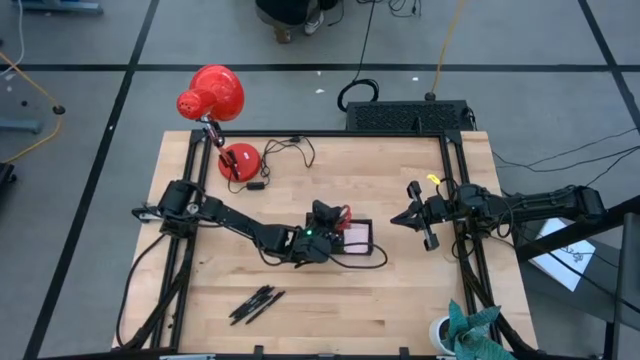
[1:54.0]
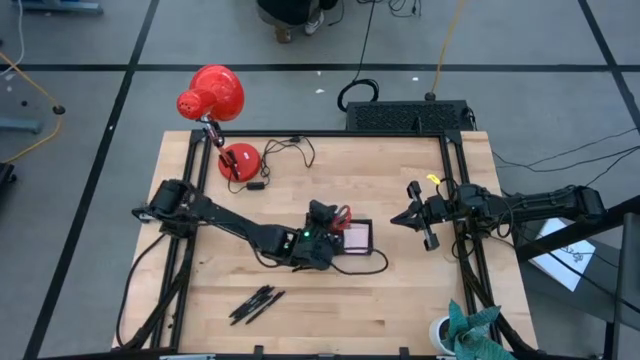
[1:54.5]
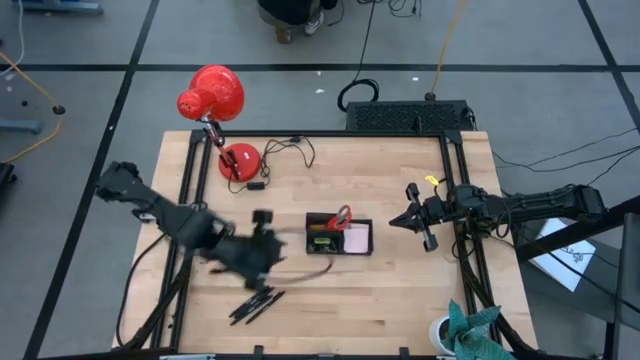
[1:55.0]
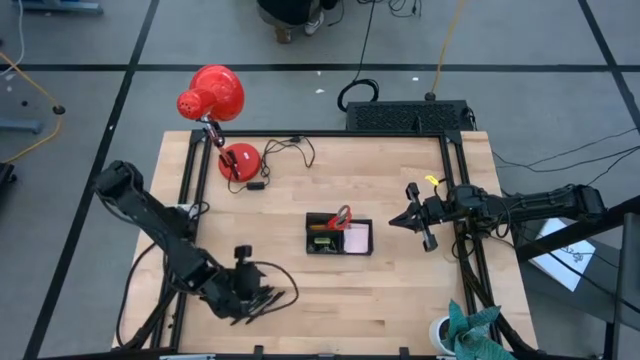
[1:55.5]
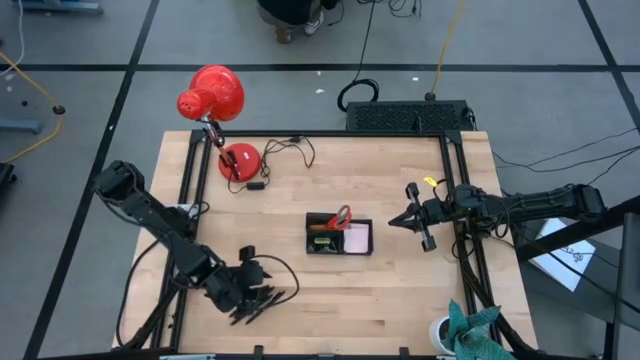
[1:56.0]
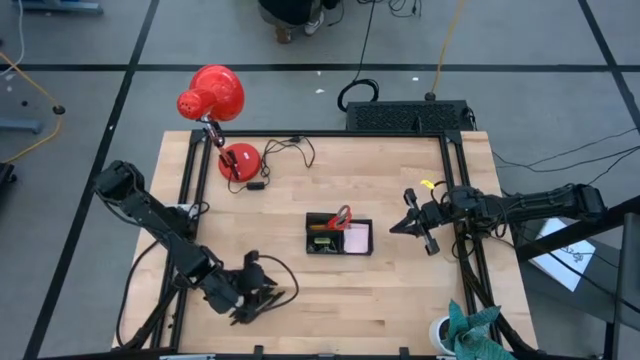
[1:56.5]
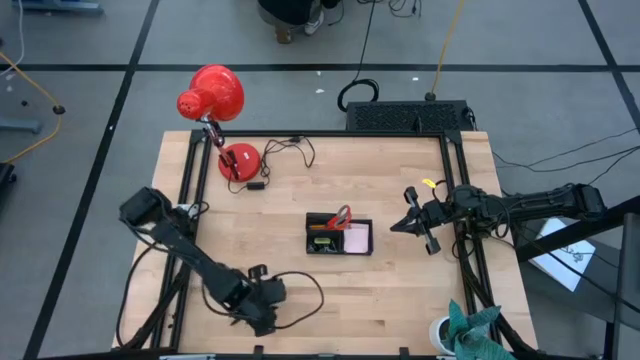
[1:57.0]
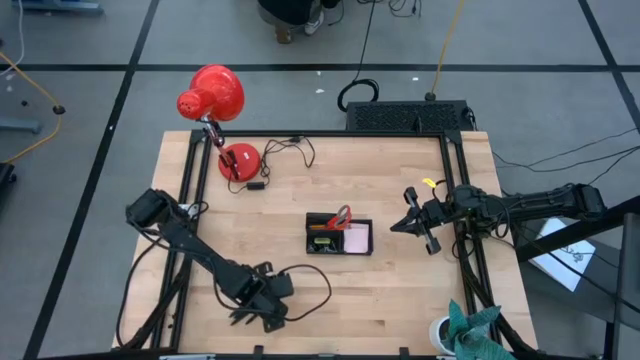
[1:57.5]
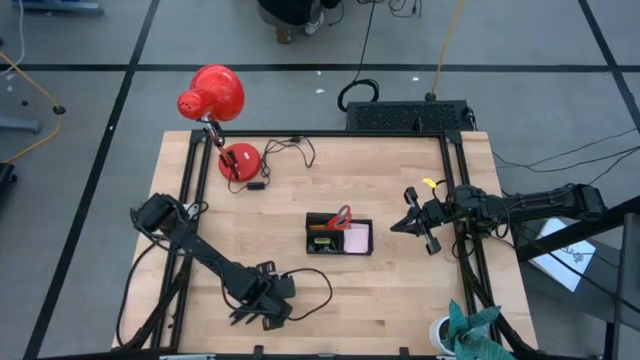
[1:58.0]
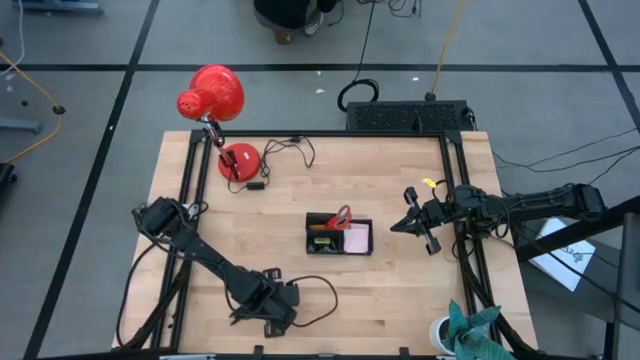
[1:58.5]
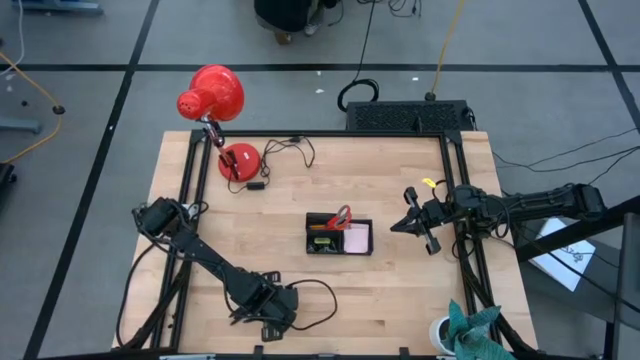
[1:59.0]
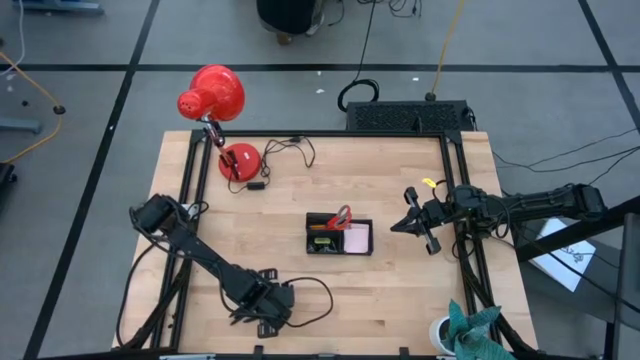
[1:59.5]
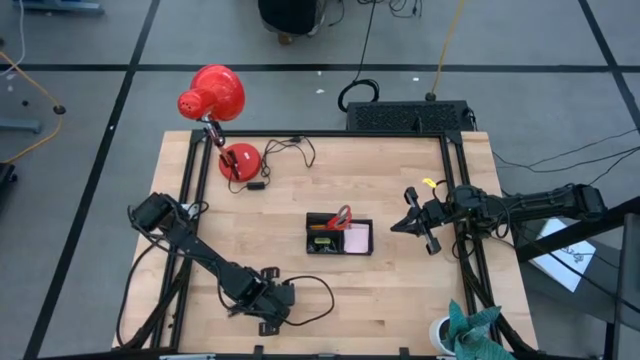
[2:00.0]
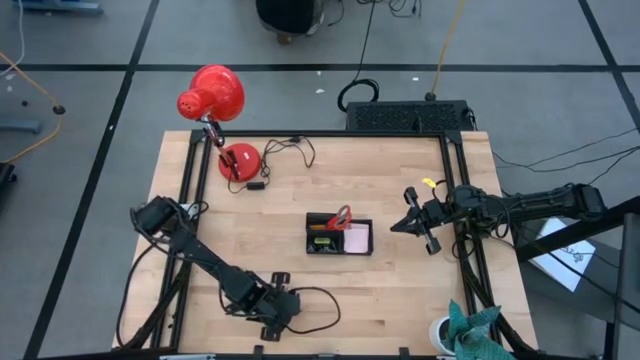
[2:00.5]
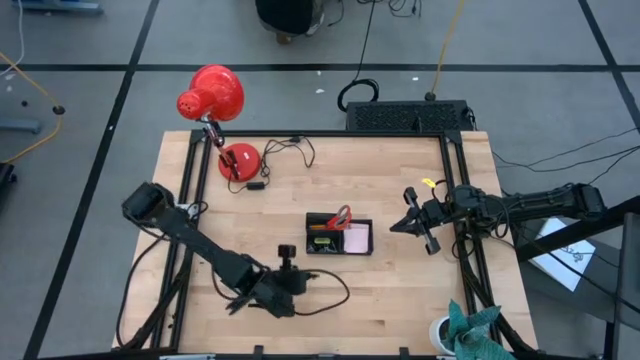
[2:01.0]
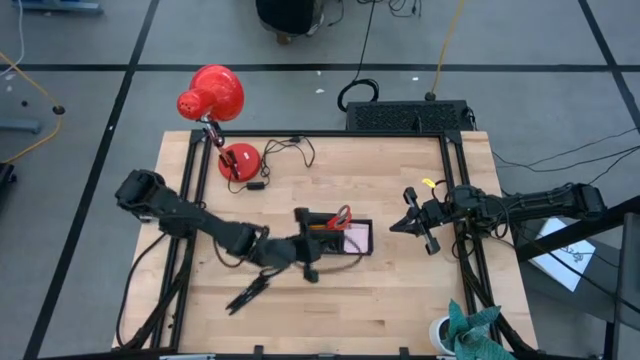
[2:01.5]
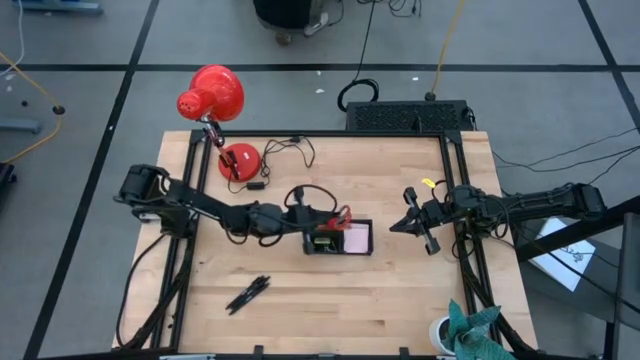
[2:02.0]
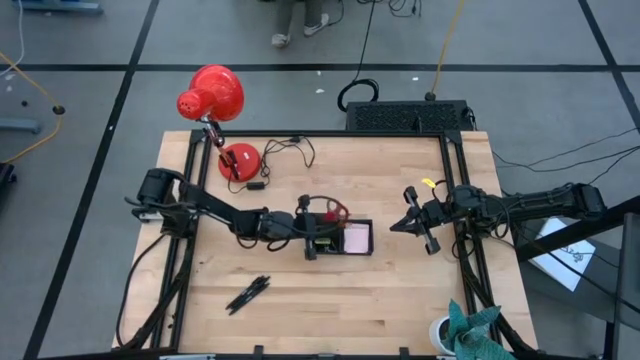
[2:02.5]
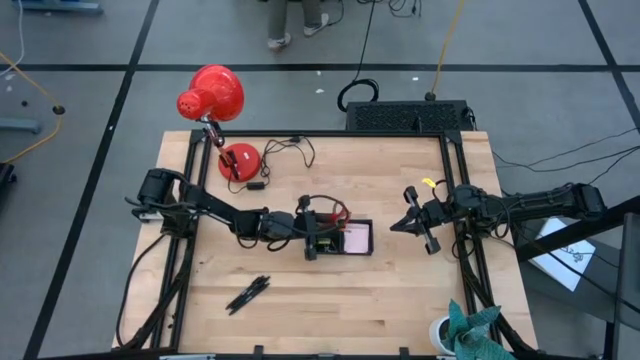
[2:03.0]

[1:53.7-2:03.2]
Task: Pick and place office supplies into organizer
Put the black pen into the black desk organizer

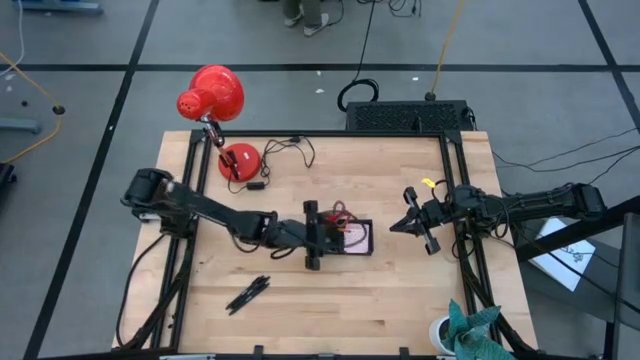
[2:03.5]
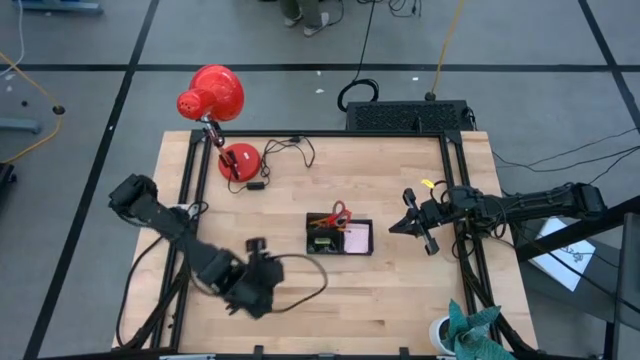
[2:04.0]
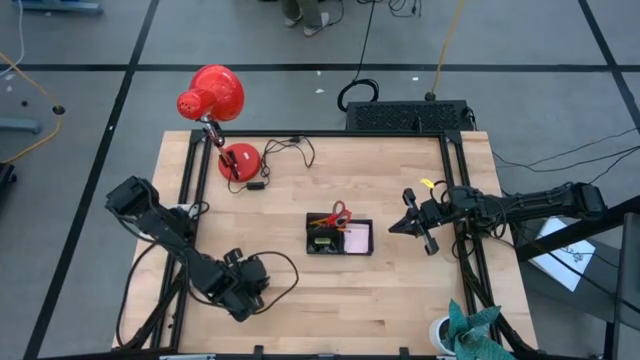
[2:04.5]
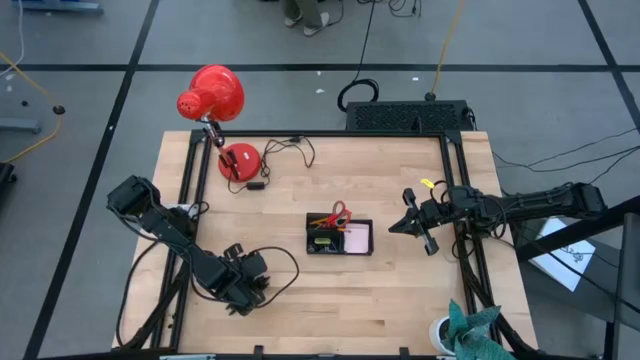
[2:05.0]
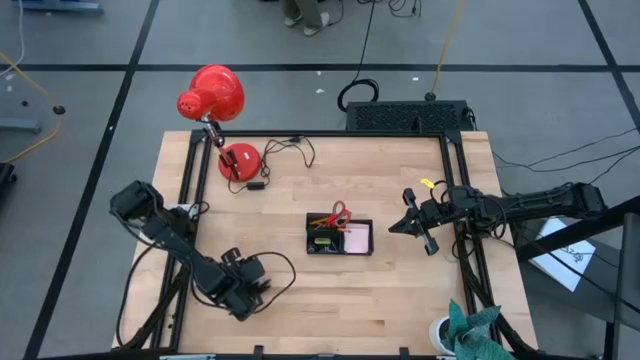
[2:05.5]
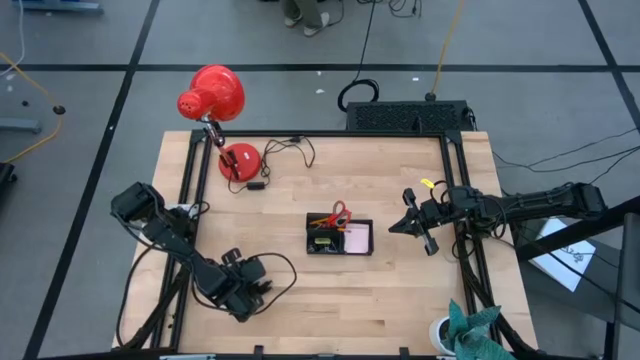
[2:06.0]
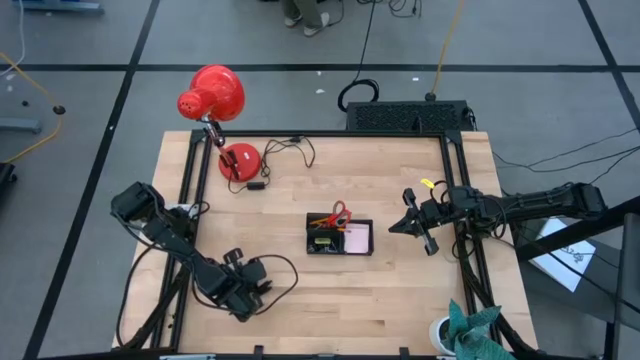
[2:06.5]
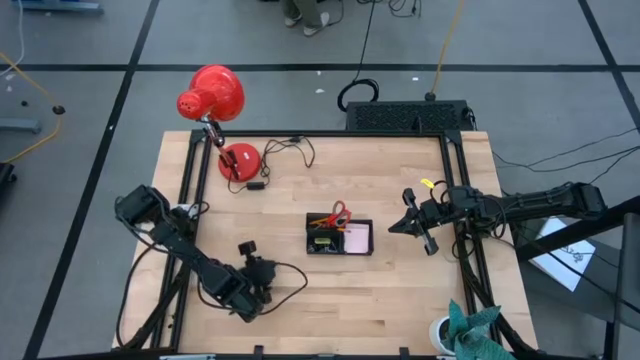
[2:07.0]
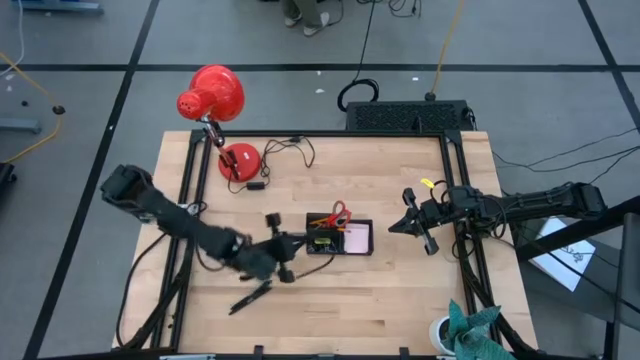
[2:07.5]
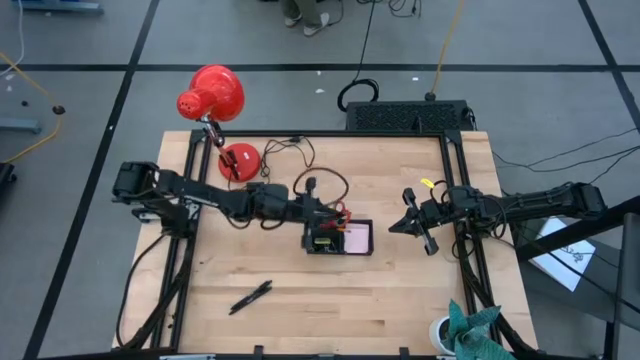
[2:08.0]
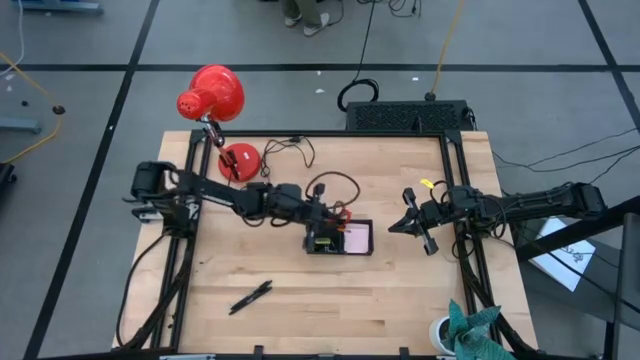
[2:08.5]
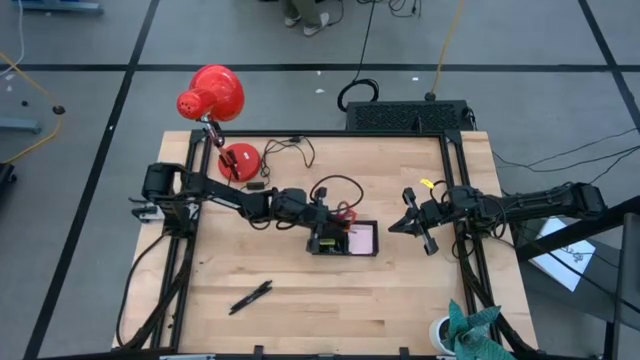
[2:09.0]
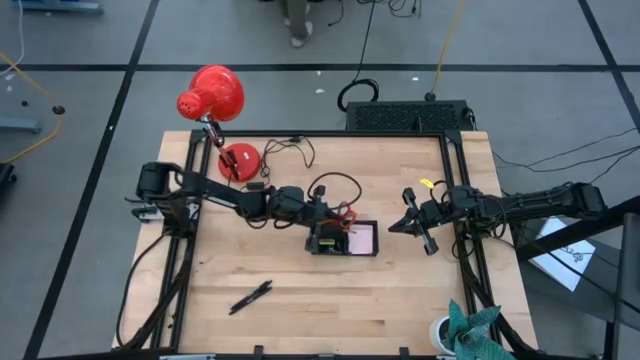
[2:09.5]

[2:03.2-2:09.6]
Put the black pen into the black desk organizer

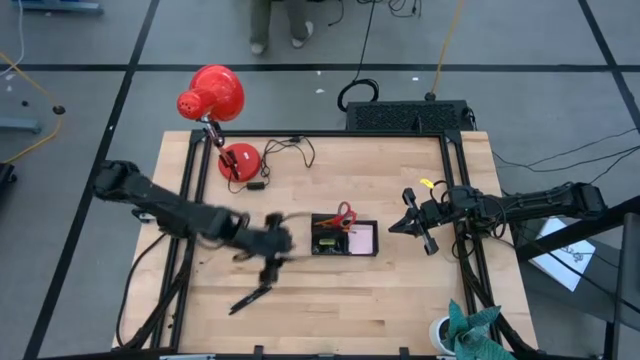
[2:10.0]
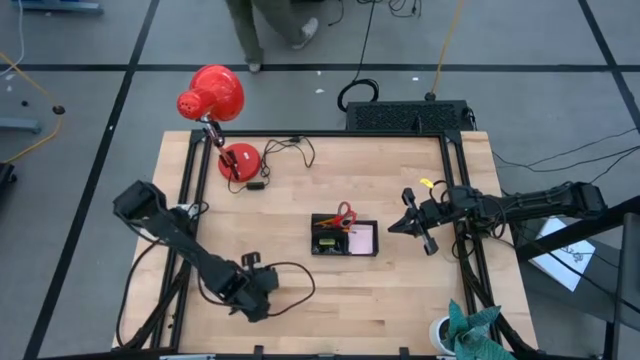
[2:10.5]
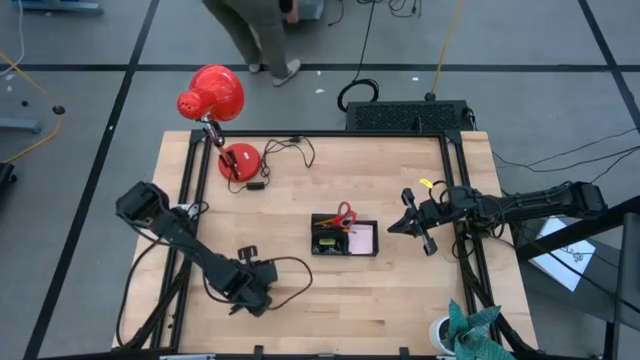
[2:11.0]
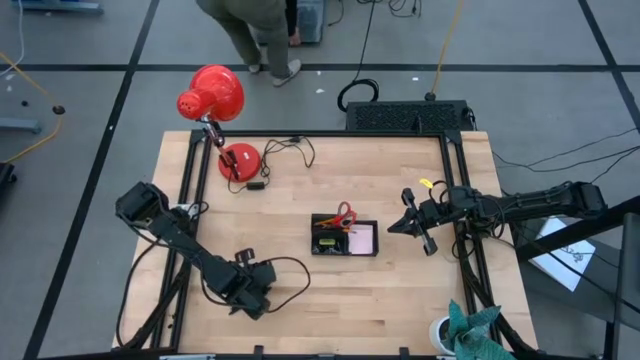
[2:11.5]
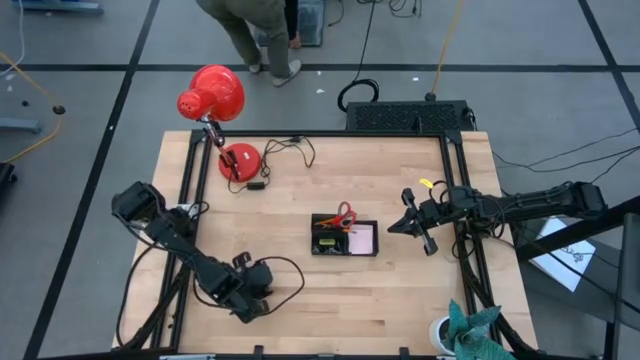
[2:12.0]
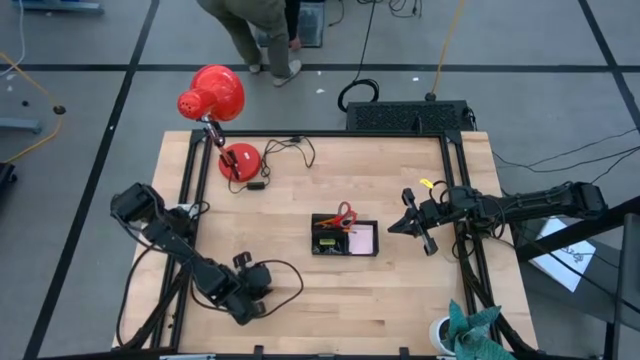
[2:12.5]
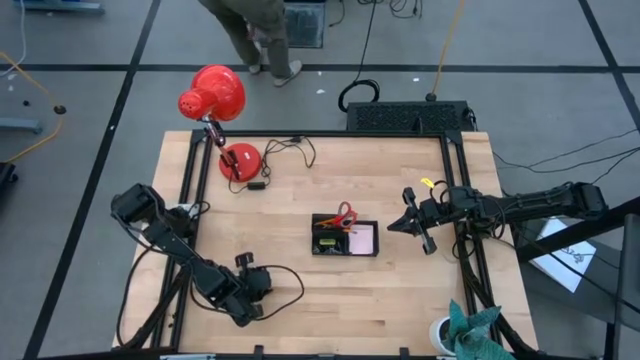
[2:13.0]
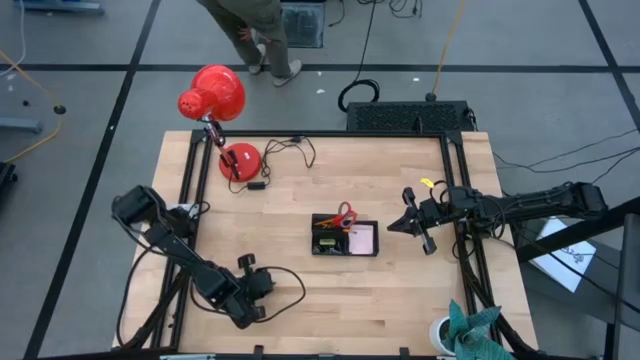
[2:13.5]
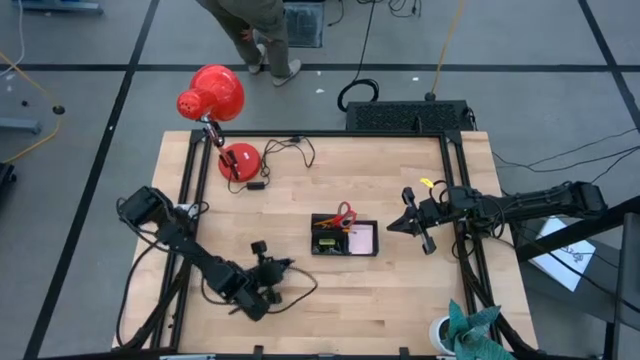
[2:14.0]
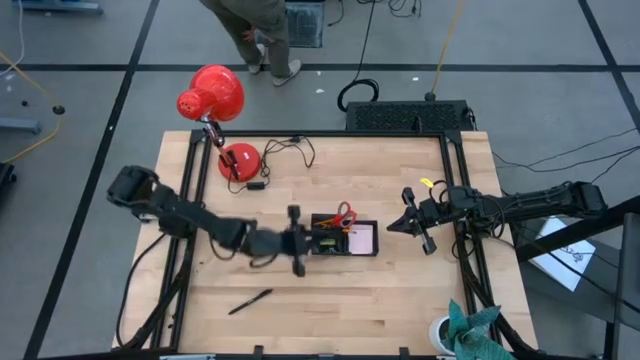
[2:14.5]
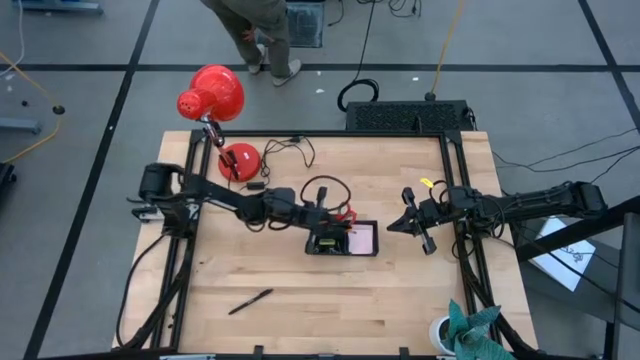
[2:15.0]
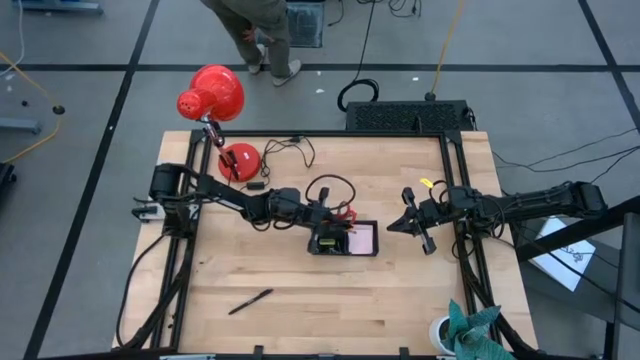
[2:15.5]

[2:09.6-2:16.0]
Put the black pen into the black desk organizer
